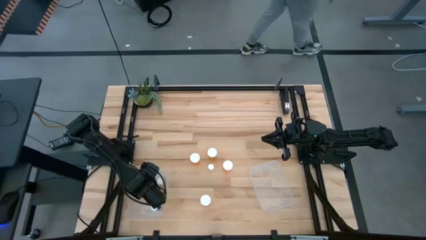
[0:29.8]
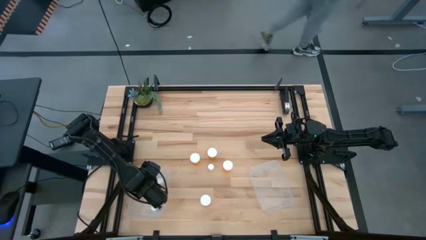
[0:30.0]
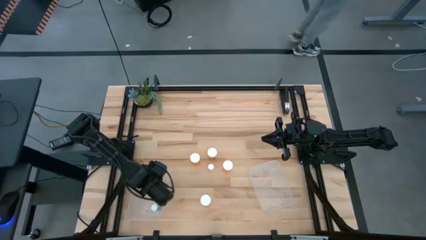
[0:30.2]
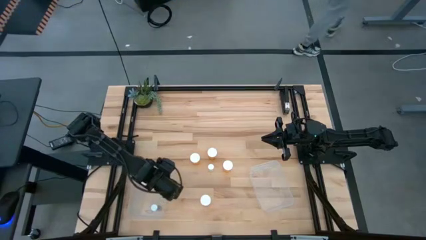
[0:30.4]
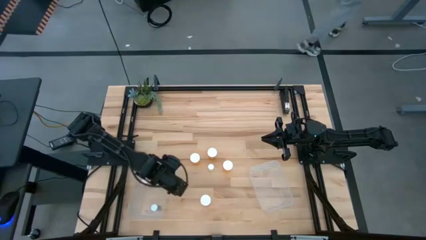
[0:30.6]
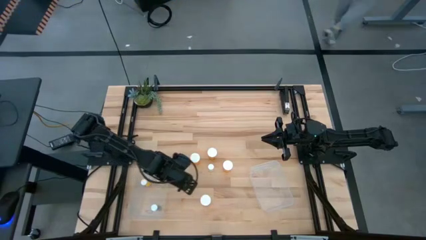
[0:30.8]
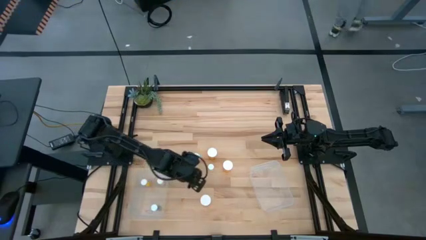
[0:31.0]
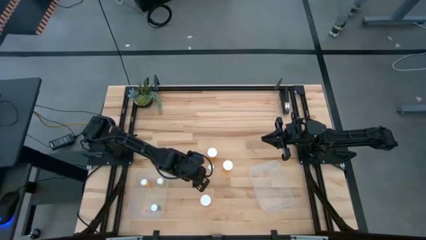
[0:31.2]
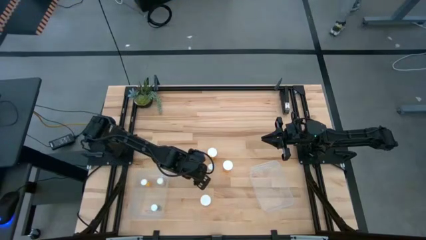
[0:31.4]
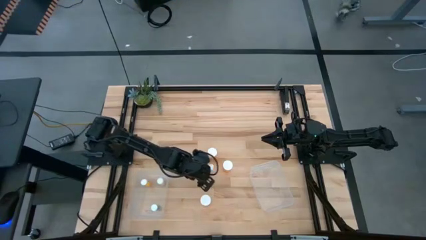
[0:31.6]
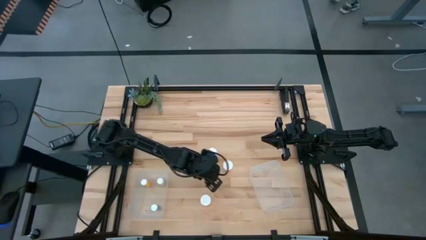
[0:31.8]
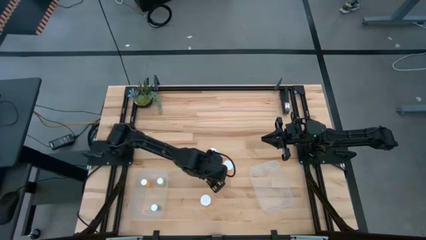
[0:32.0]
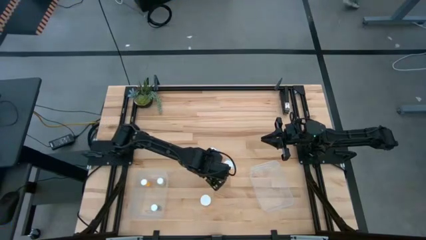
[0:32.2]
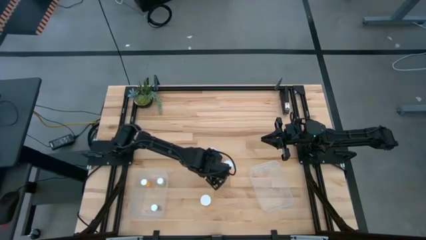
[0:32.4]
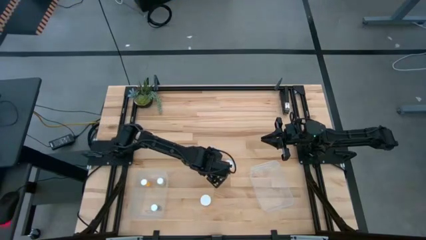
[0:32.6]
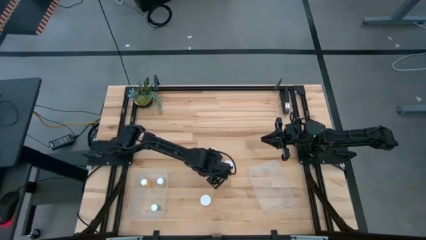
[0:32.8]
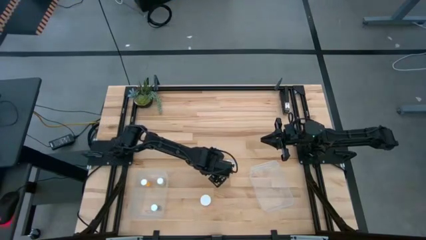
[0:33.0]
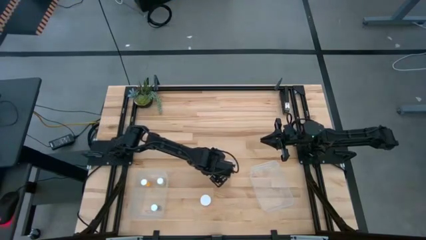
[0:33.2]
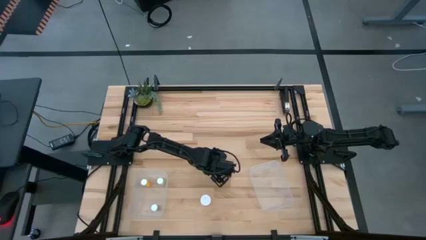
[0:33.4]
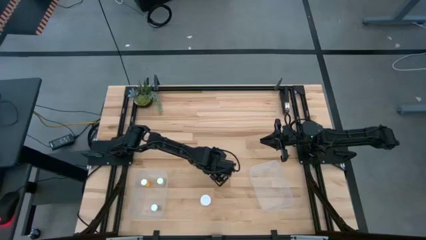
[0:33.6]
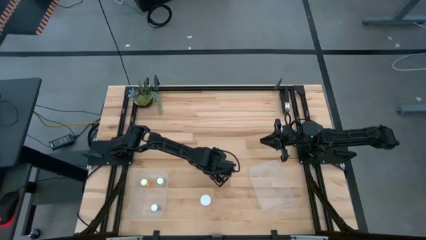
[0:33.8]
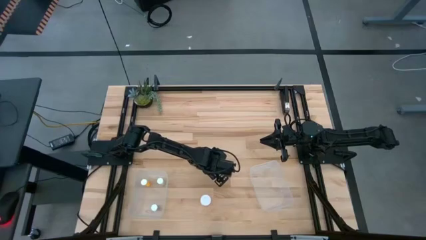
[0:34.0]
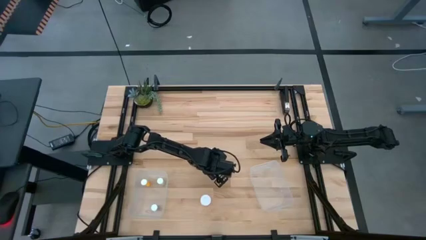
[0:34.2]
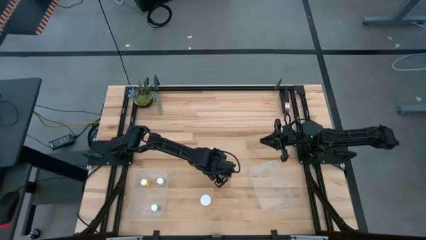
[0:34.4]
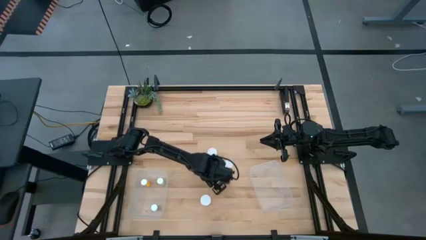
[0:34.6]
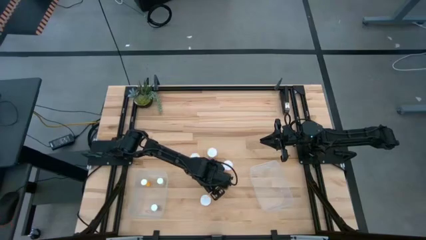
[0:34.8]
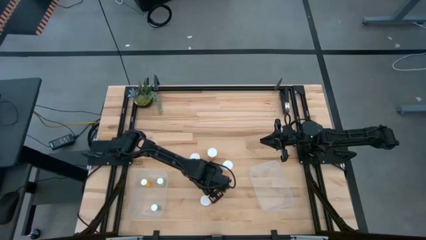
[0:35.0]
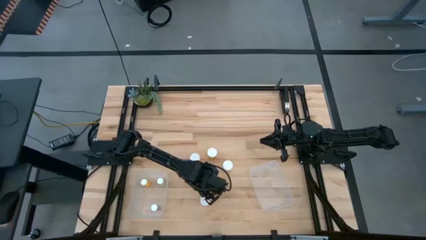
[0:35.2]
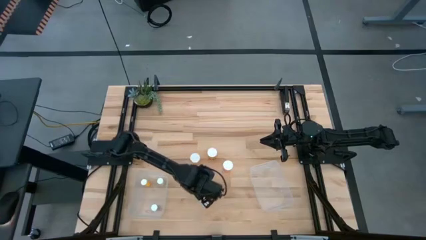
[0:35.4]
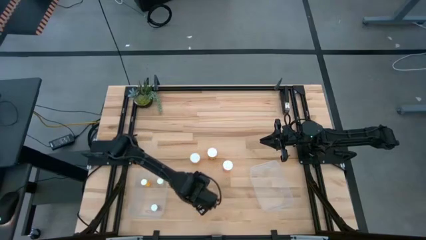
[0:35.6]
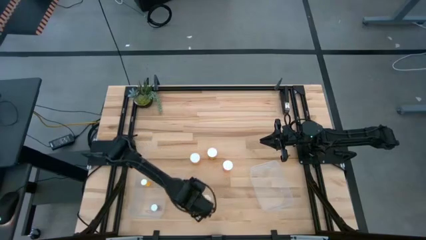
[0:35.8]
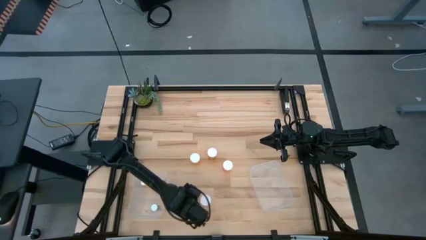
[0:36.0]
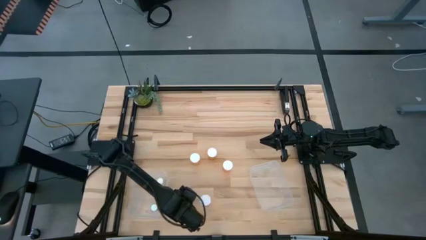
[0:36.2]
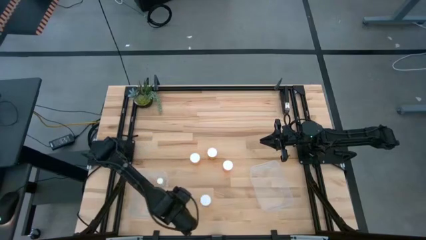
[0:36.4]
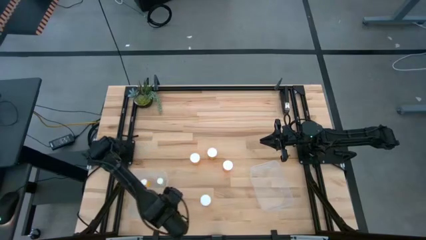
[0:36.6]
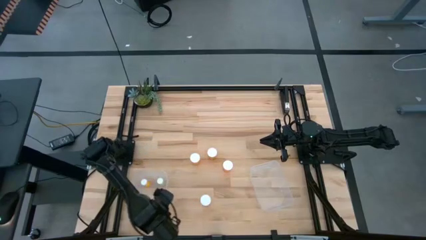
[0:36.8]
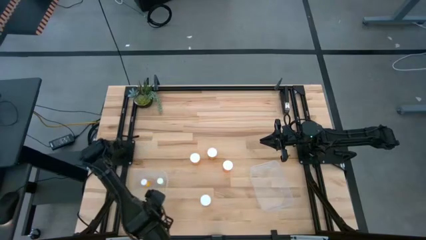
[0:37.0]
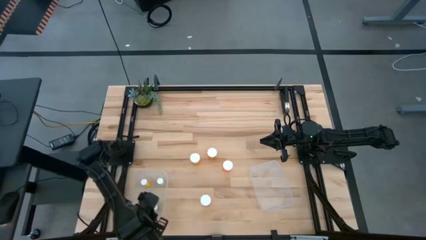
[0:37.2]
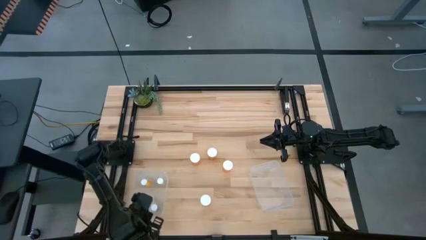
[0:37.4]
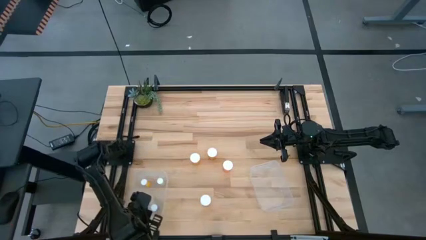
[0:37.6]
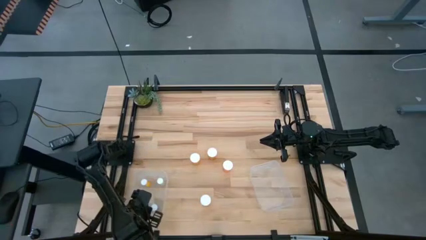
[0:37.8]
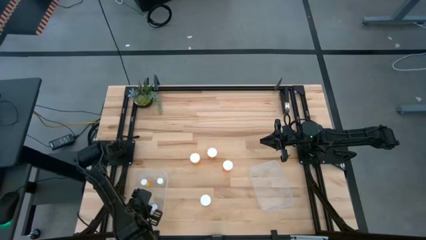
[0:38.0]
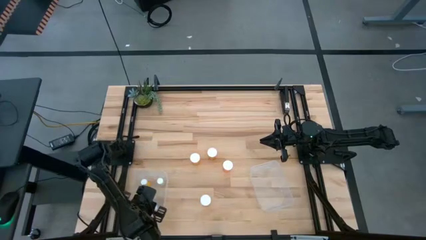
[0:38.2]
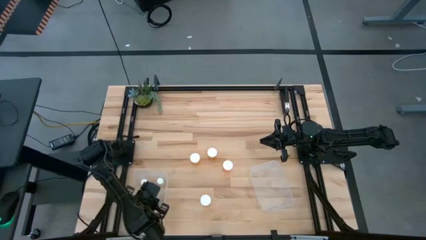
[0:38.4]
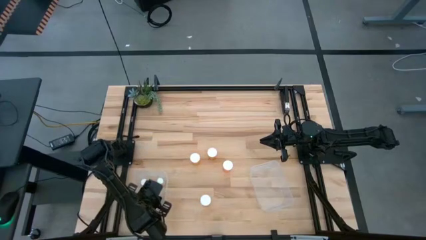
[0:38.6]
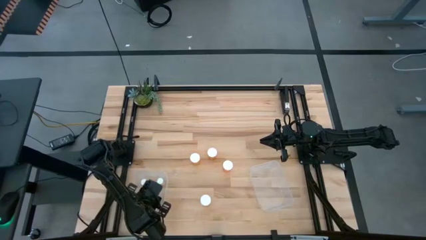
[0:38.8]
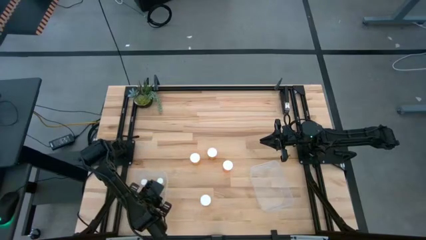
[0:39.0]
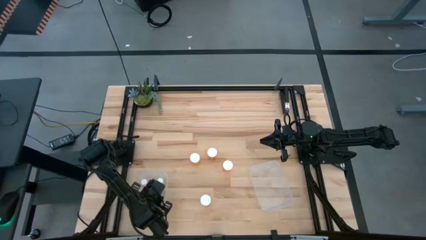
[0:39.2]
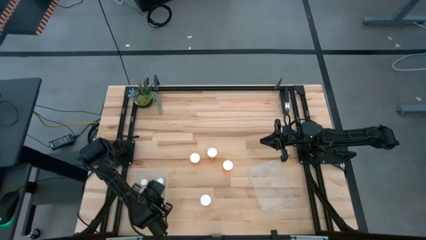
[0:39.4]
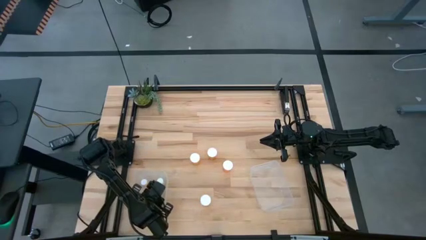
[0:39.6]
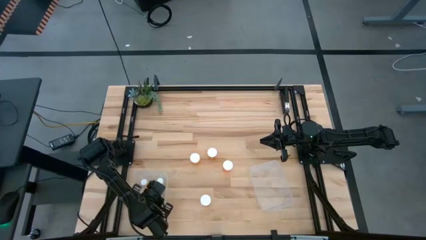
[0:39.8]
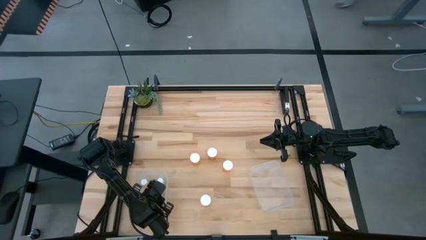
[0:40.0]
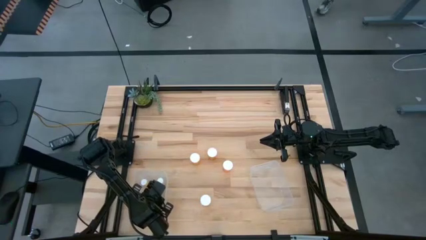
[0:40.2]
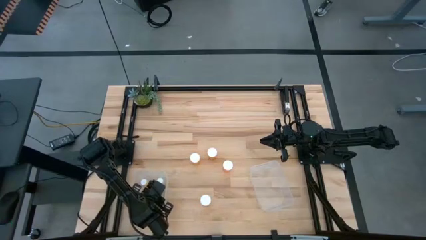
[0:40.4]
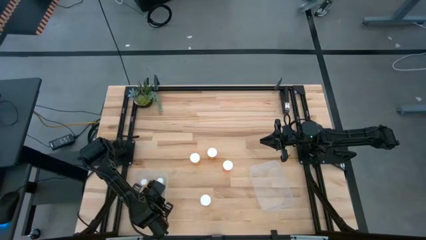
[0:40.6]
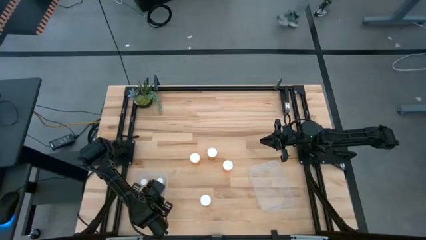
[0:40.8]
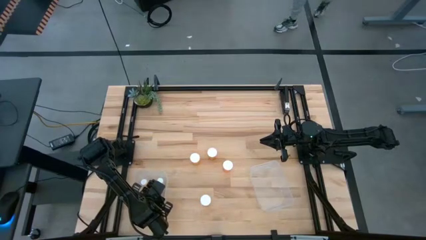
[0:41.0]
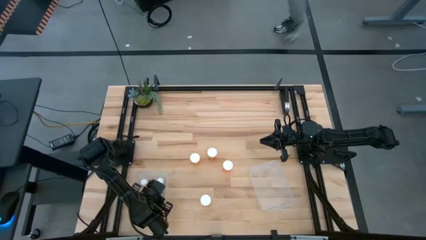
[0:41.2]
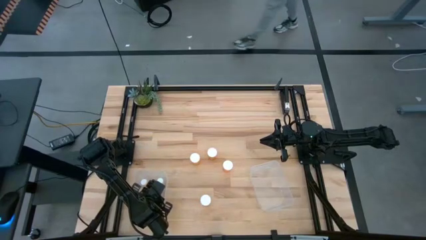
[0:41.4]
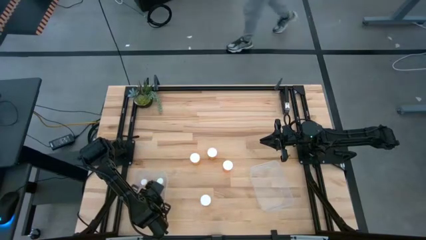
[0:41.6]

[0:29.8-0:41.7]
Task: Pick and place medicine bottles into bin by pill shape (circle, oval)
Put the small yellow pill bottle into the left transparent bin

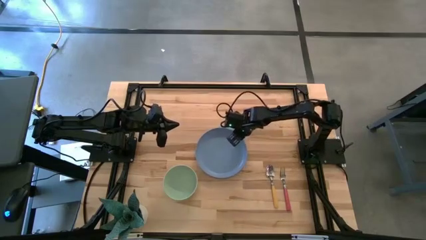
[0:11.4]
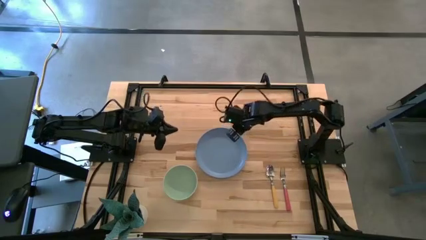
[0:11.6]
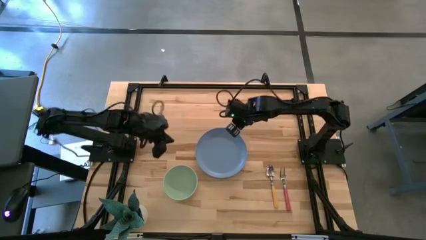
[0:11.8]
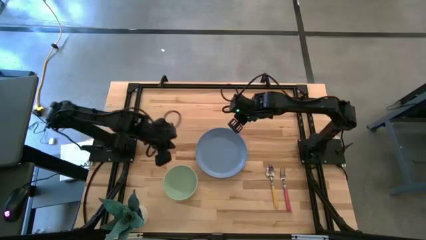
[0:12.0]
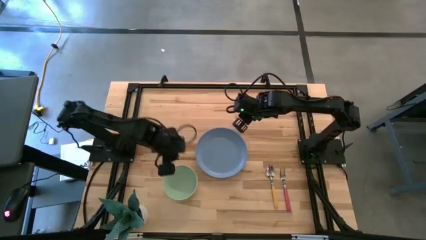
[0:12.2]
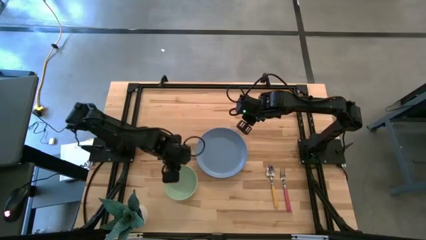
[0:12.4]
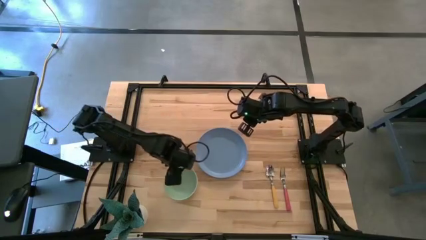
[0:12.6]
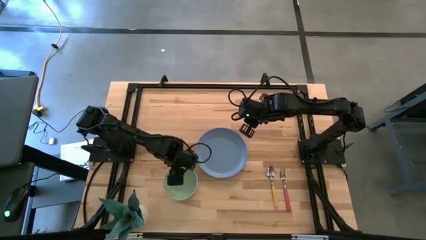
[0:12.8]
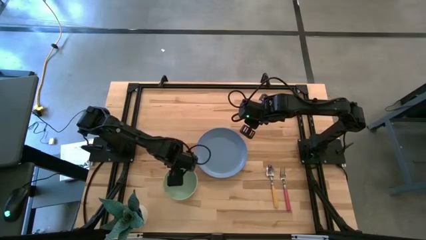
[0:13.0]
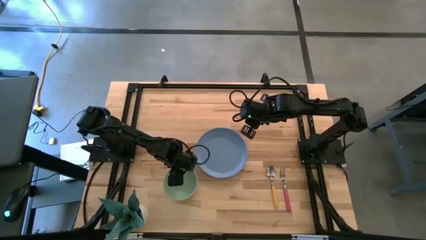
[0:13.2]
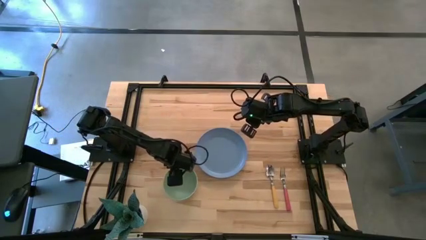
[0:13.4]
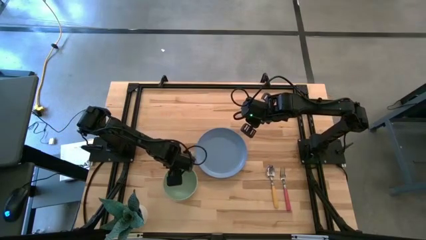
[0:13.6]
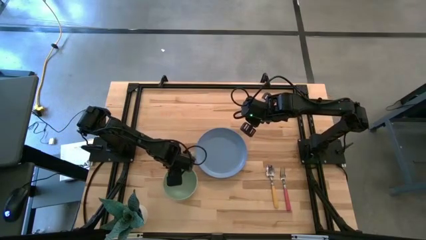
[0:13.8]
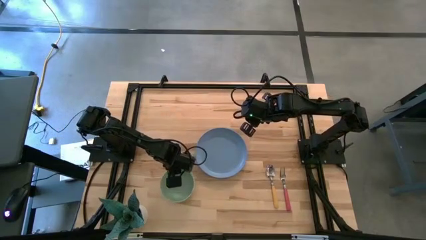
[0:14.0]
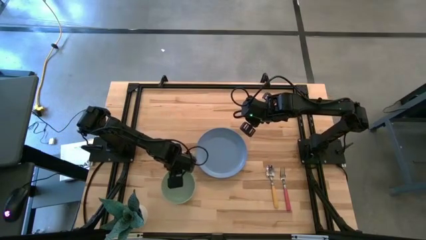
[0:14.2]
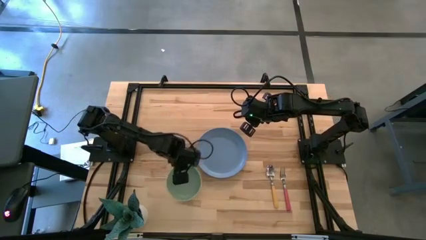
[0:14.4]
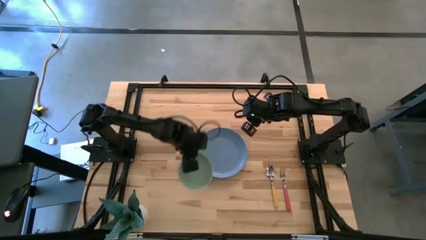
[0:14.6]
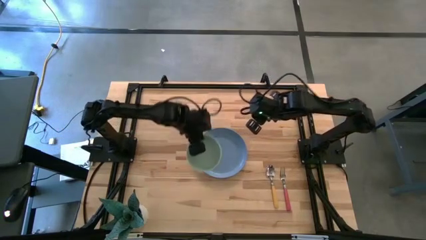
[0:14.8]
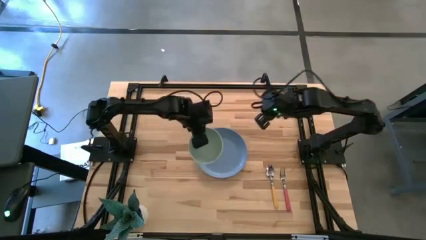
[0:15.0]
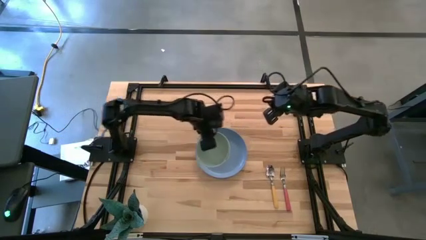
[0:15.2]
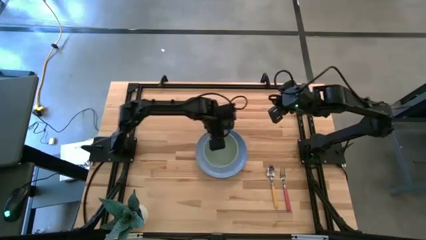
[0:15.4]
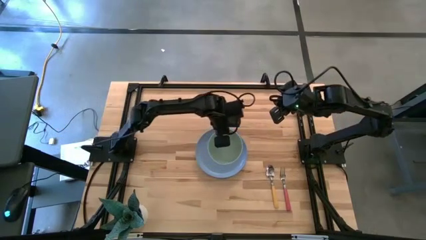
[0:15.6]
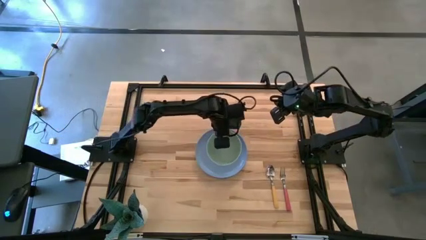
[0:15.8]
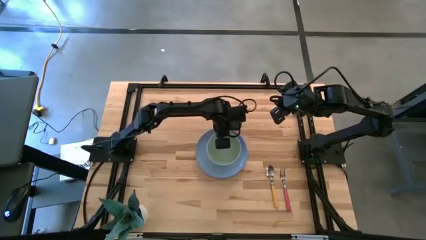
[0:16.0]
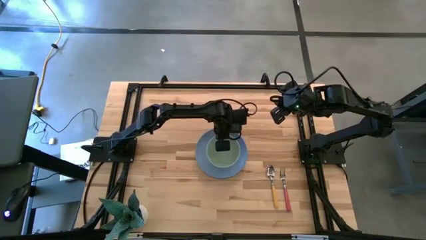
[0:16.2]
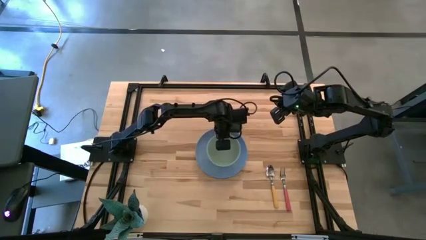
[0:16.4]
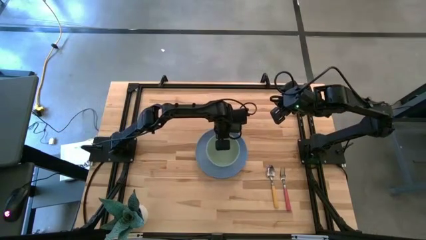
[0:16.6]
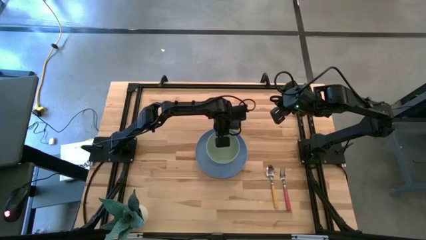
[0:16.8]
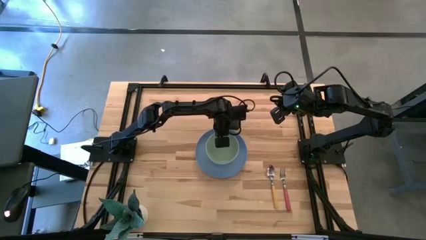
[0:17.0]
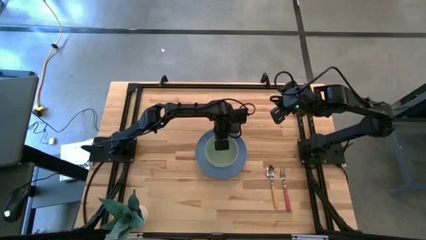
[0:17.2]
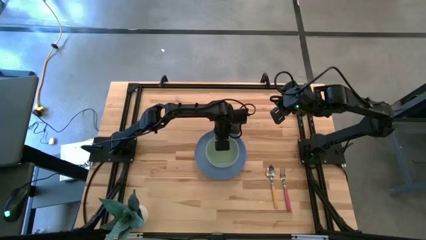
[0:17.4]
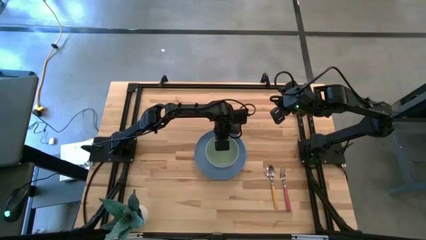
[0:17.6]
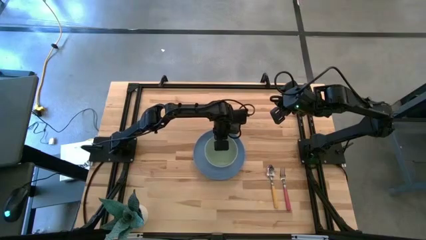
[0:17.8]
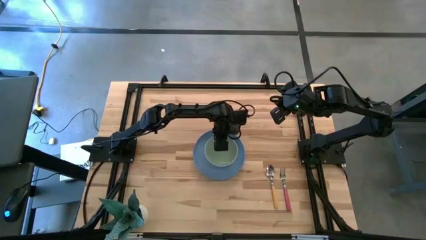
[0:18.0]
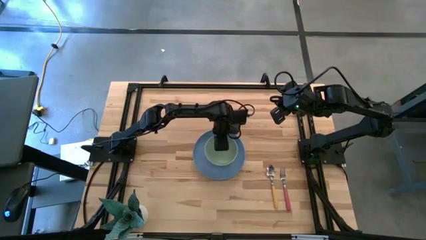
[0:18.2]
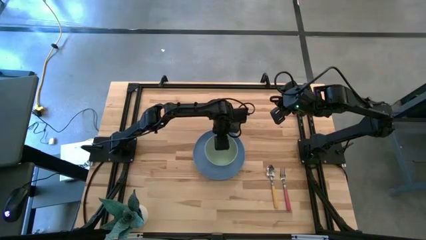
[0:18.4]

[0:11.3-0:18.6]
Task: Set table place
Put the green bowl on top of the blue plate
